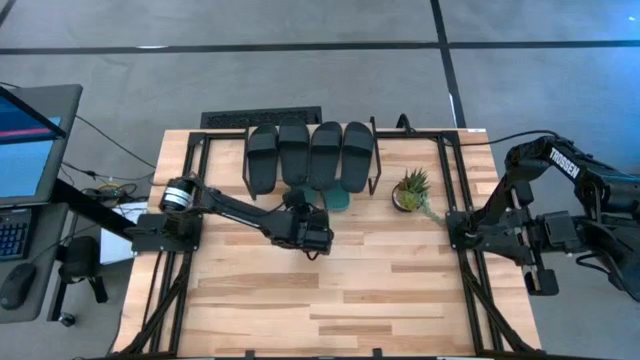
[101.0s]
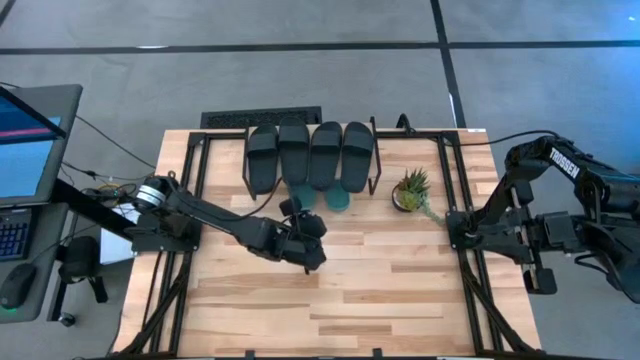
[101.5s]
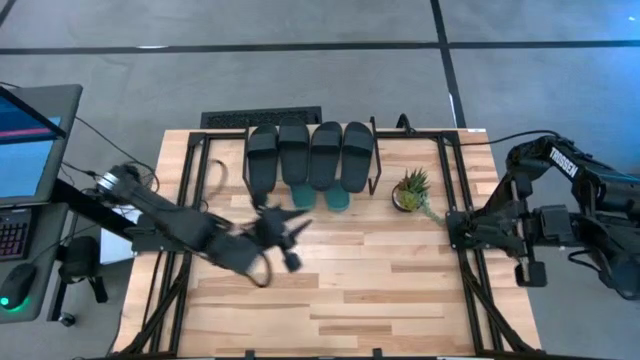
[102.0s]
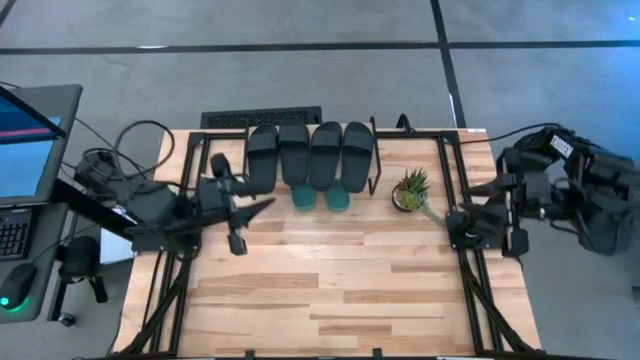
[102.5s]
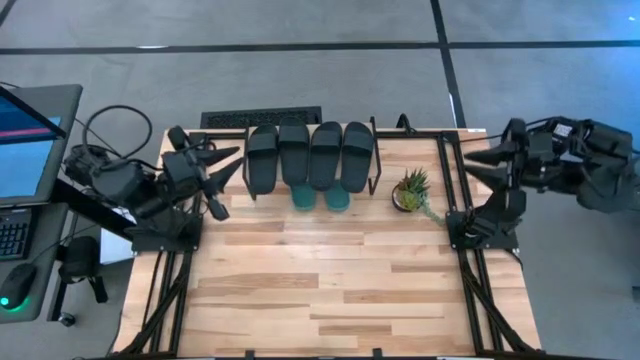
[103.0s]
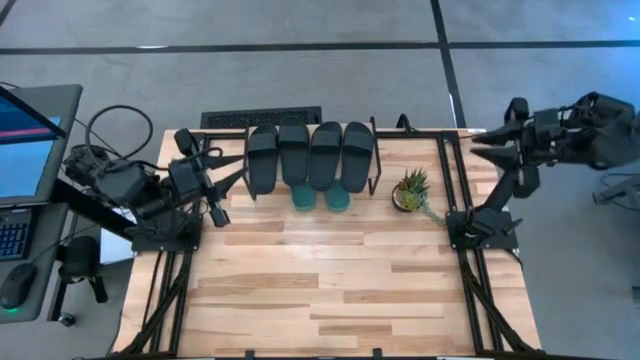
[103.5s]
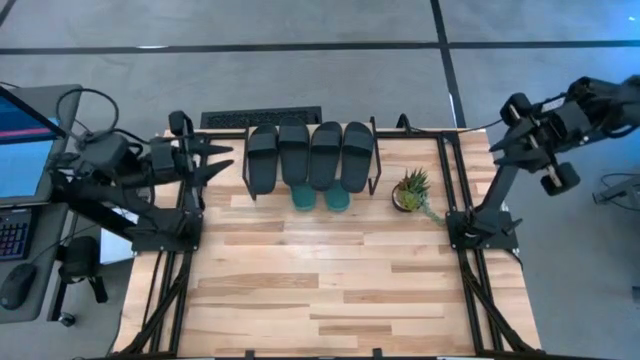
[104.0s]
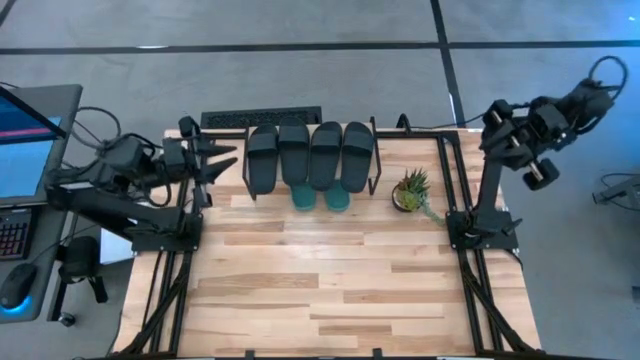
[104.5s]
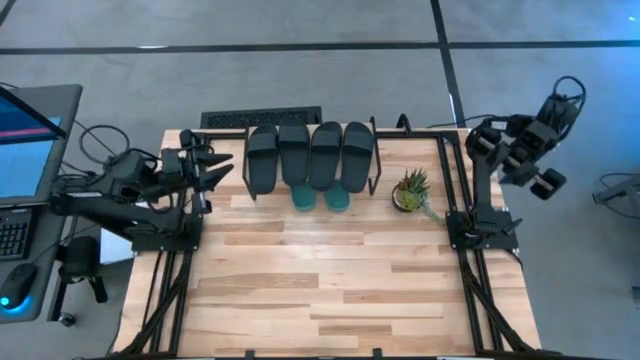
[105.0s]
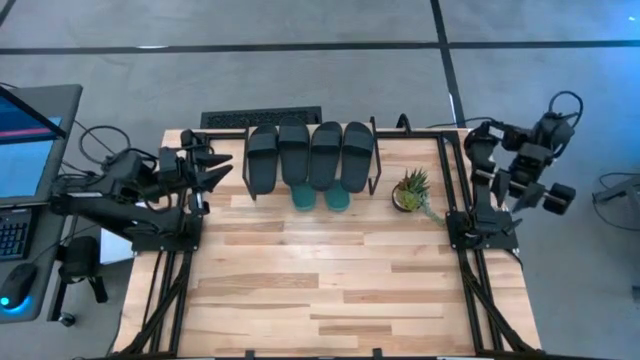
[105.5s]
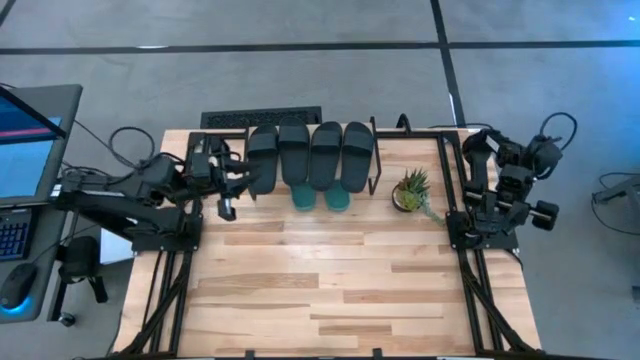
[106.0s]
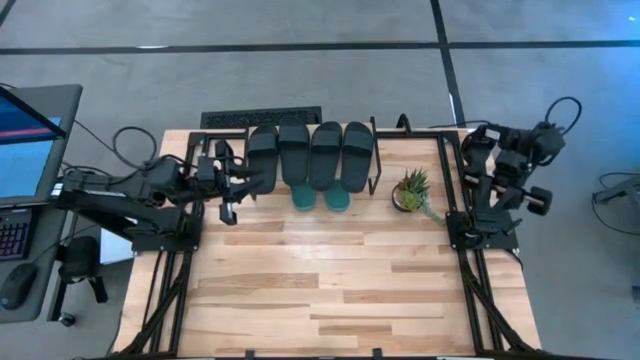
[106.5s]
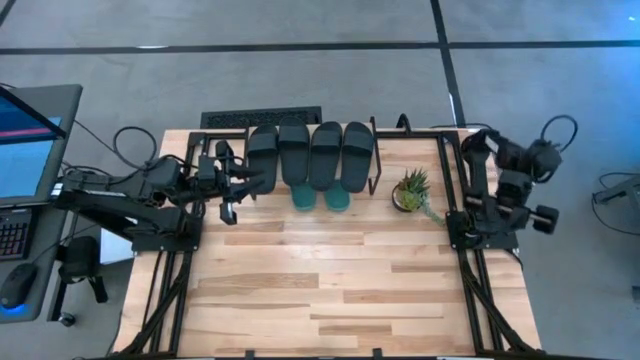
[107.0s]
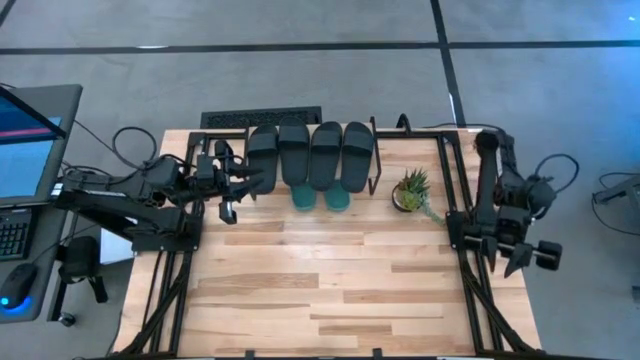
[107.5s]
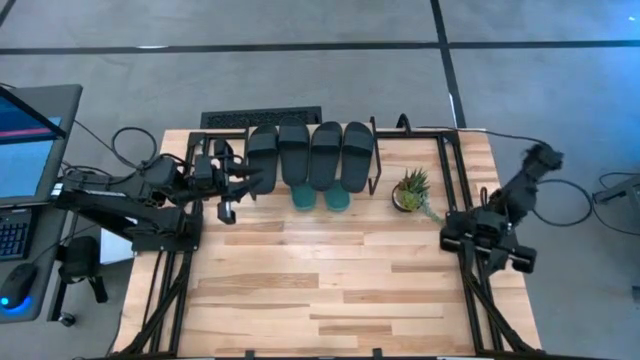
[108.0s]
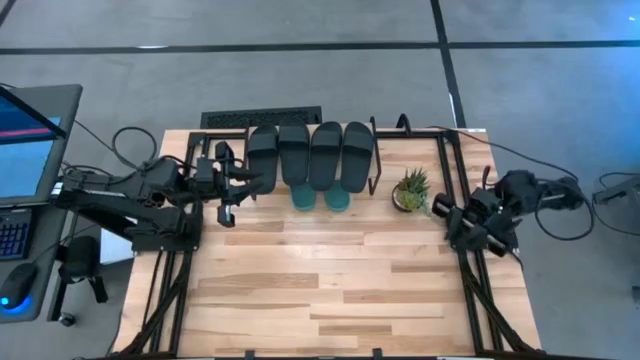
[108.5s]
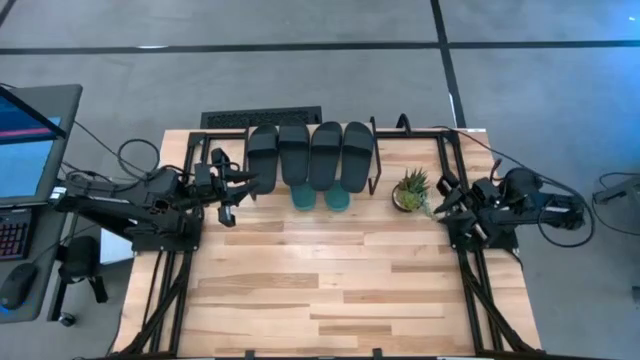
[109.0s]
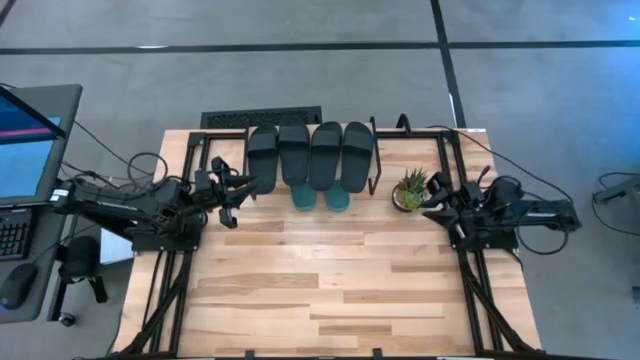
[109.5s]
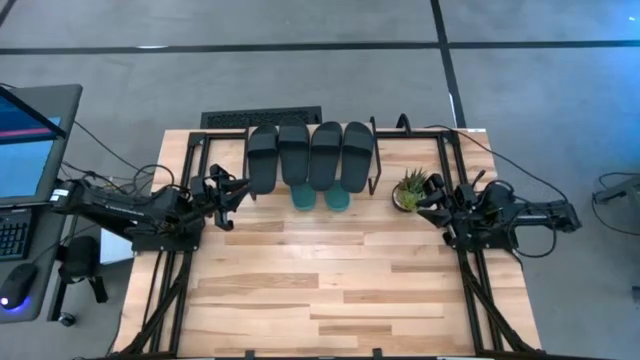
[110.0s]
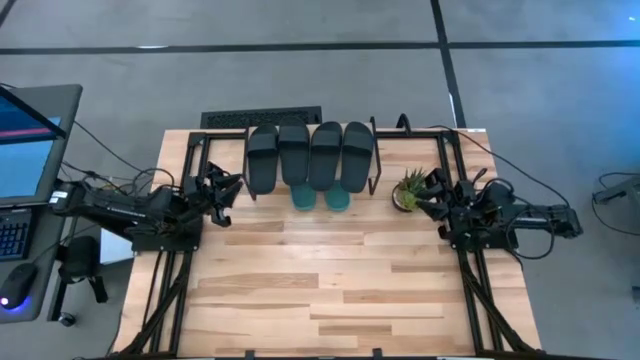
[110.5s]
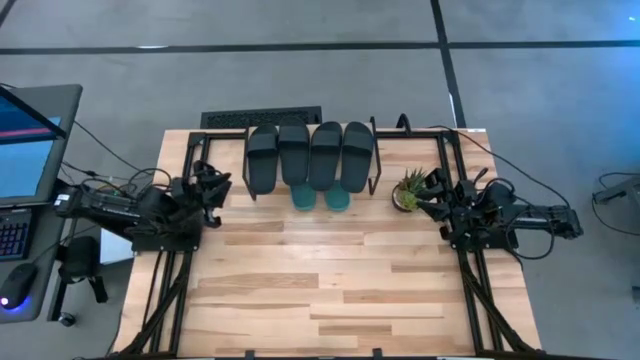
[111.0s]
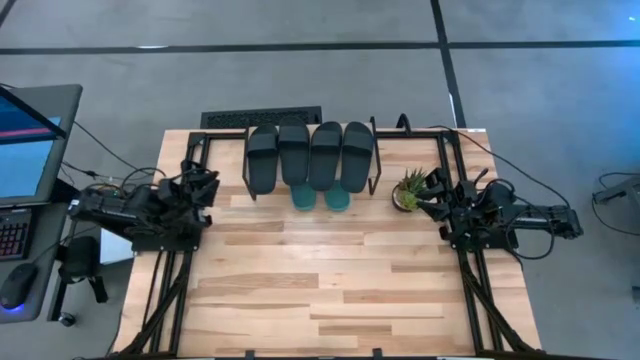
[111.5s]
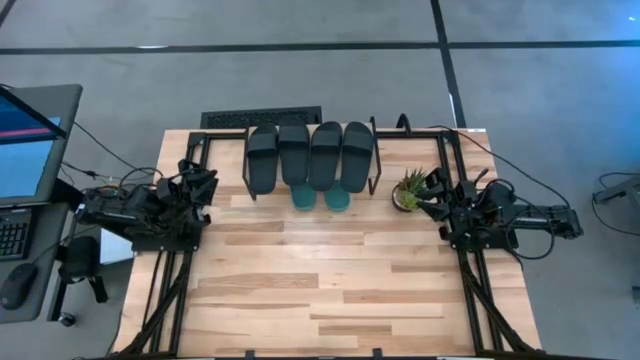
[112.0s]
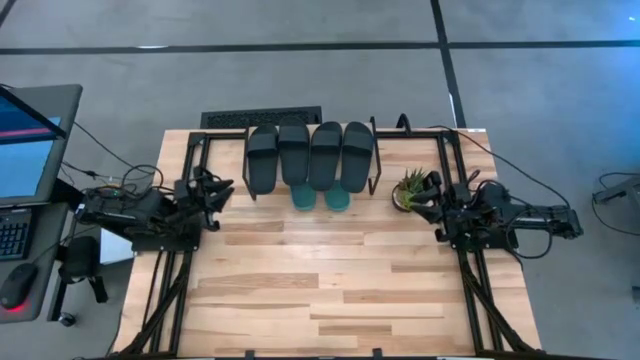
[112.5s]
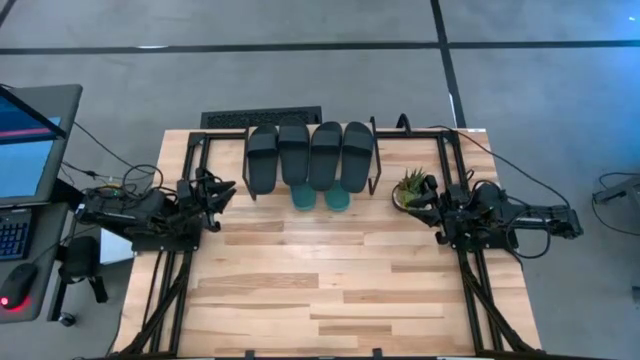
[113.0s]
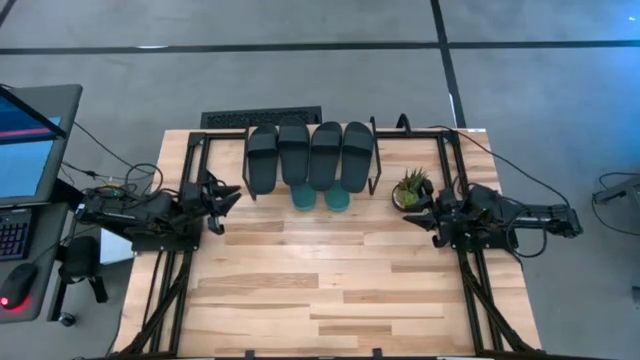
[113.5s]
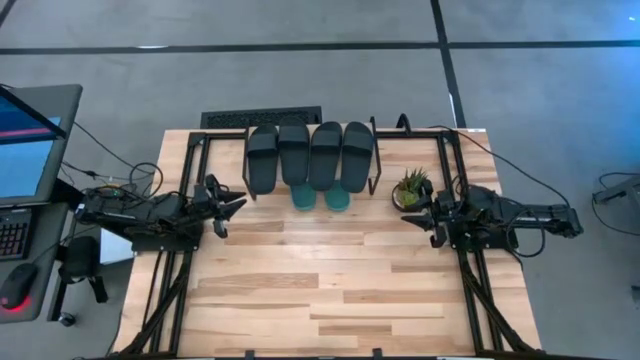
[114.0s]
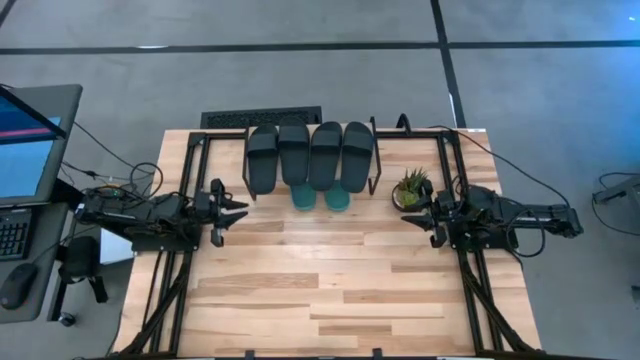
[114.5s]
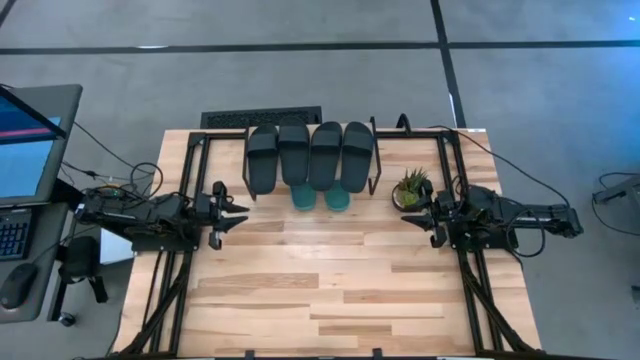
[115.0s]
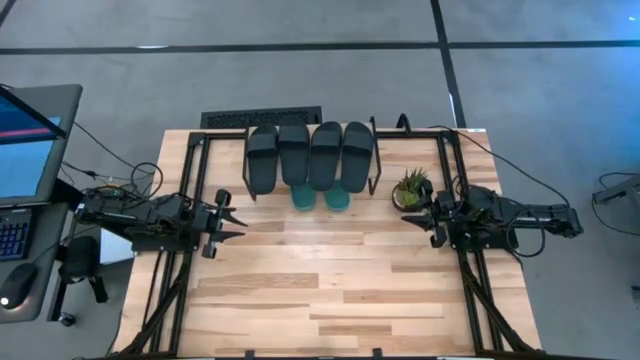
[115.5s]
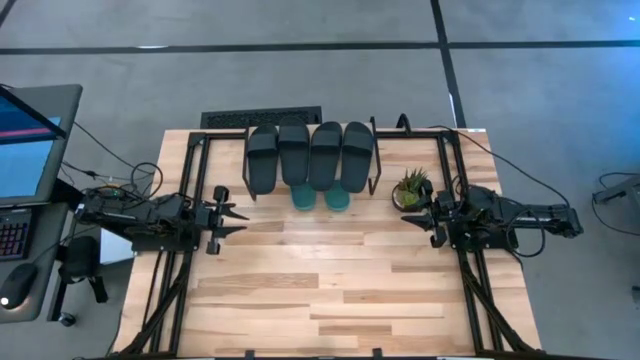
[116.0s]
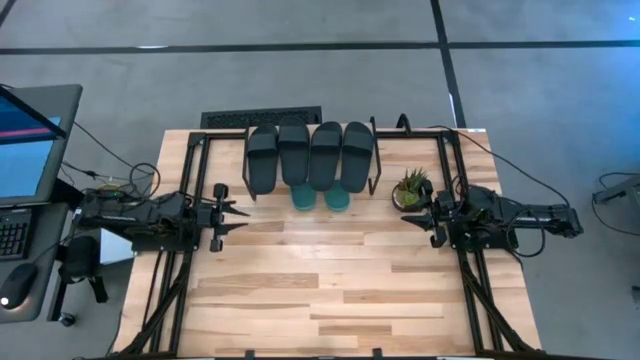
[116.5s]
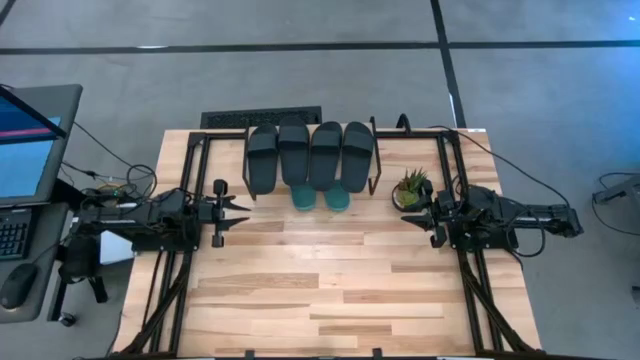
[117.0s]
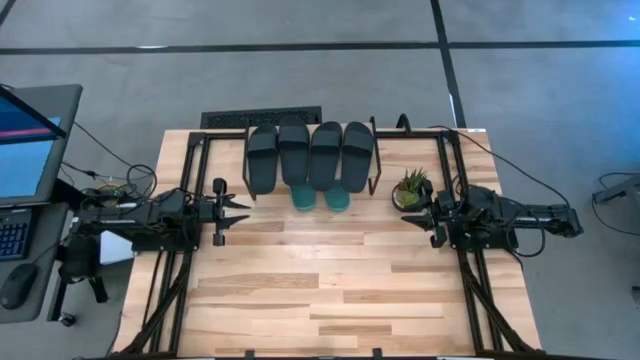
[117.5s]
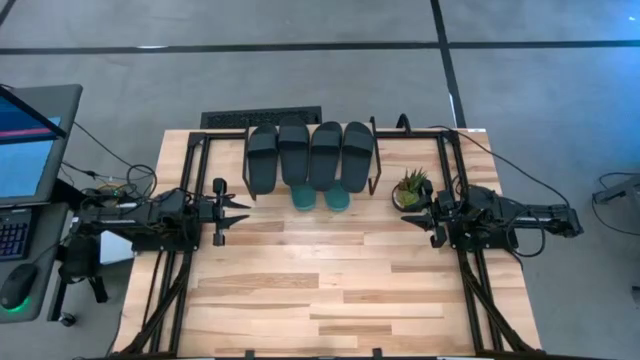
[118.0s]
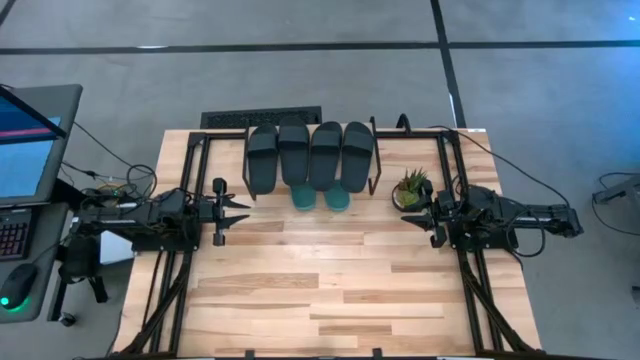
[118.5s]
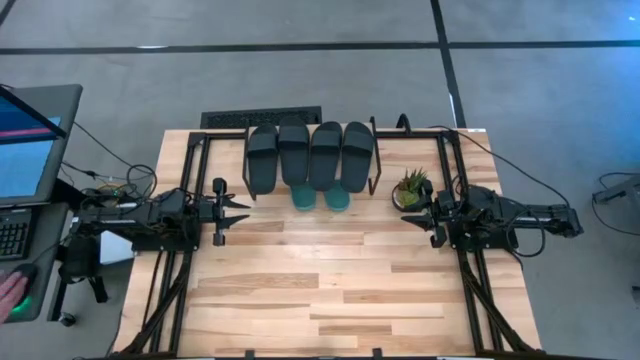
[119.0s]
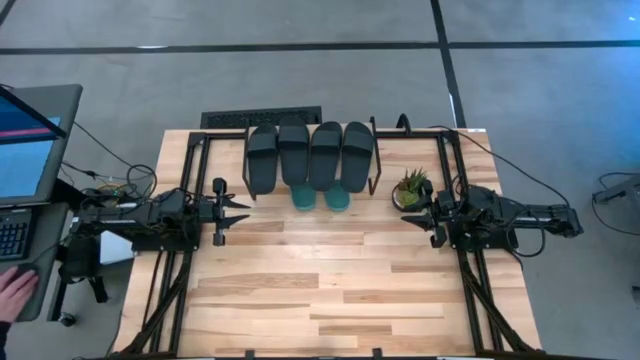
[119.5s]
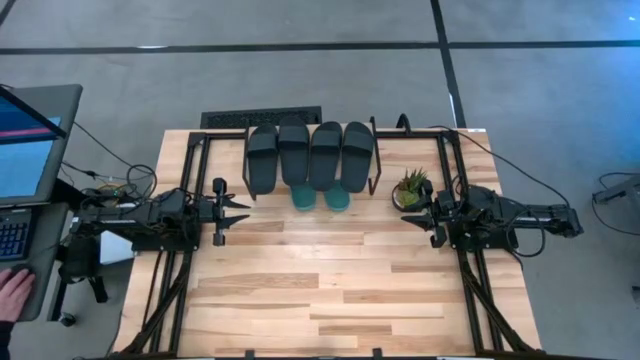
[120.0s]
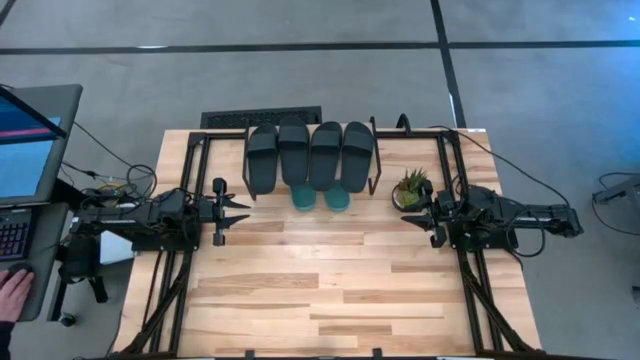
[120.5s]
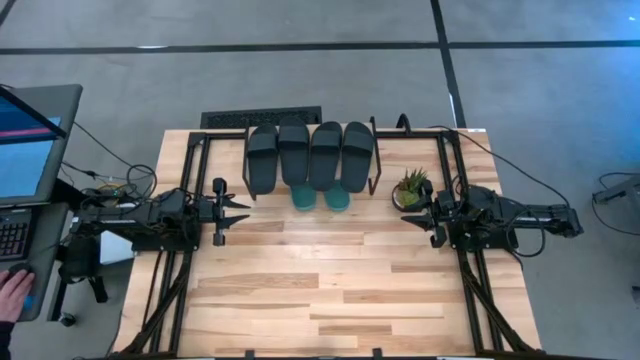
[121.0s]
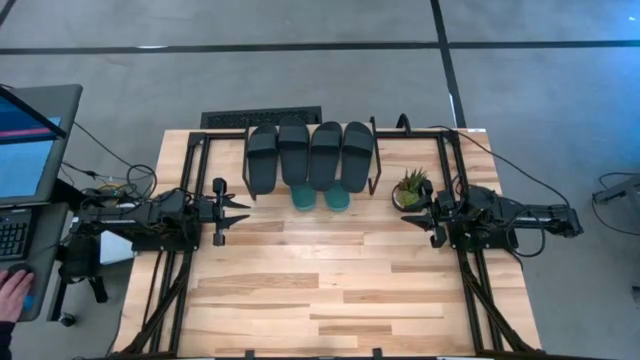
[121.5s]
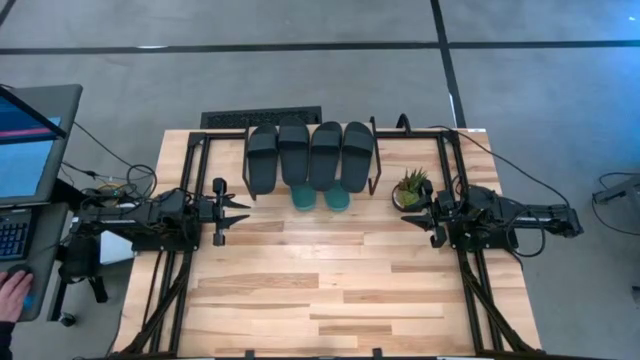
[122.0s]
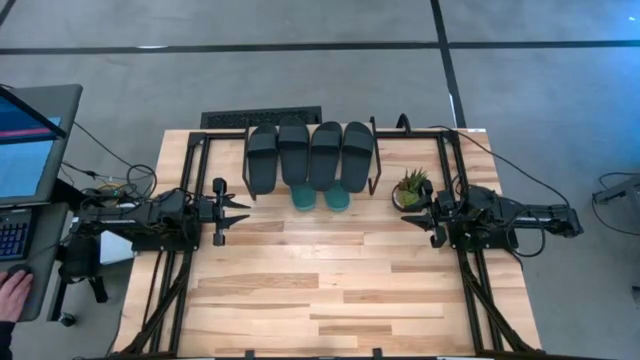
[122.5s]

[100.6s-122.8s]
Task: Pick and place slides into the shelf
Return to Home Position
